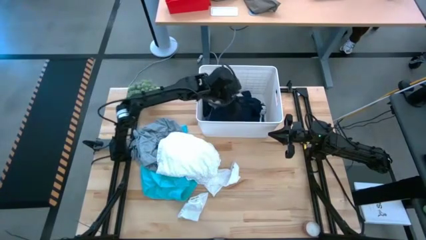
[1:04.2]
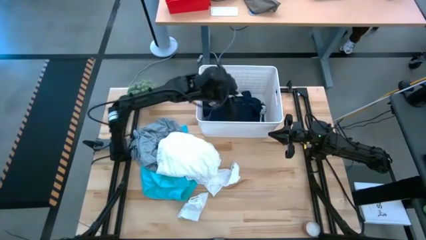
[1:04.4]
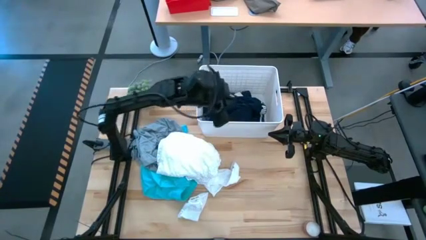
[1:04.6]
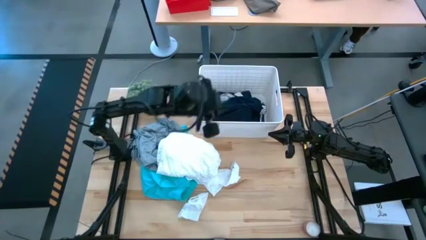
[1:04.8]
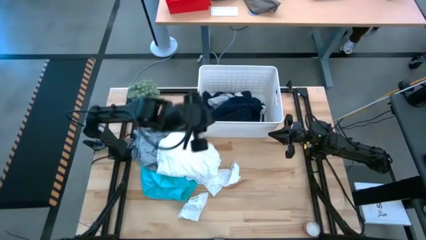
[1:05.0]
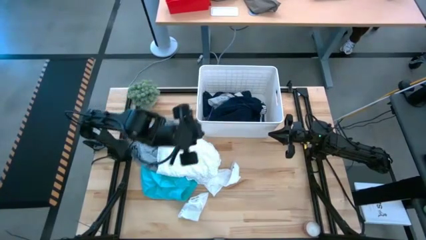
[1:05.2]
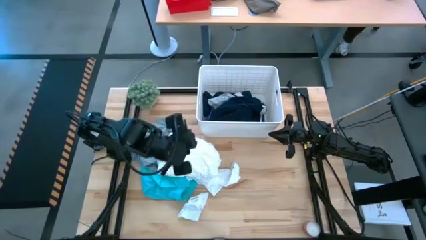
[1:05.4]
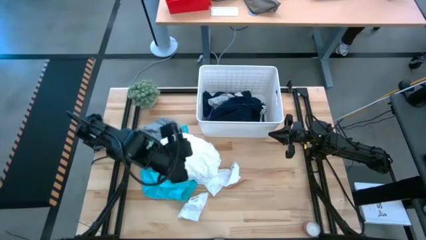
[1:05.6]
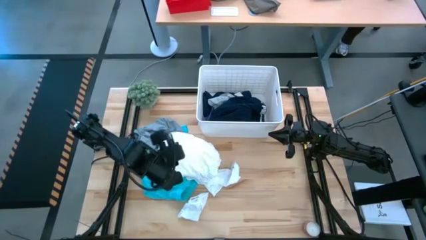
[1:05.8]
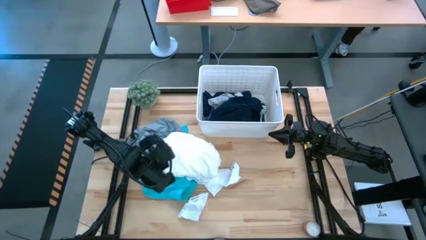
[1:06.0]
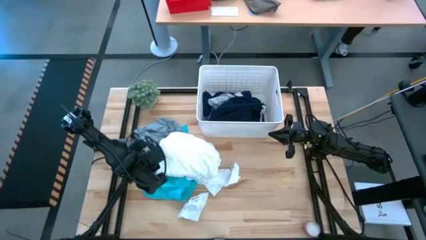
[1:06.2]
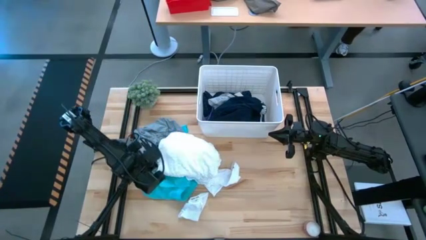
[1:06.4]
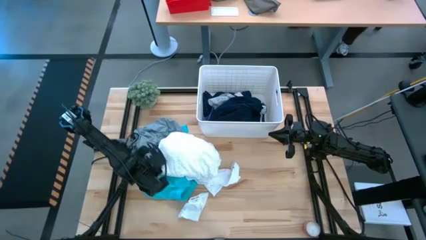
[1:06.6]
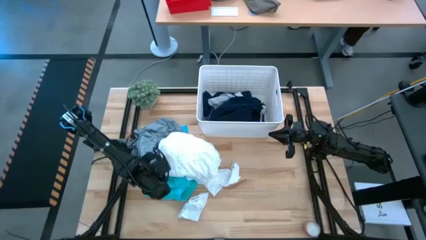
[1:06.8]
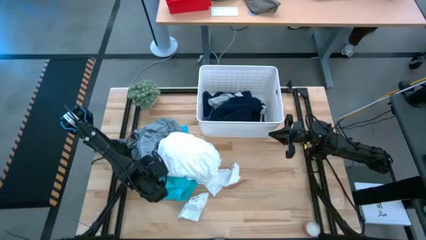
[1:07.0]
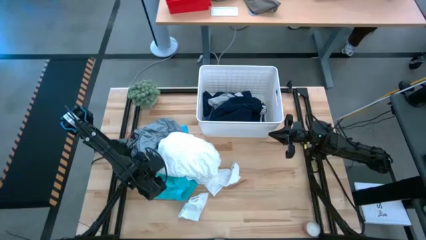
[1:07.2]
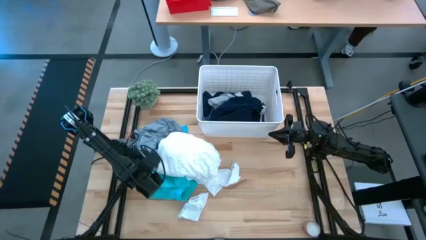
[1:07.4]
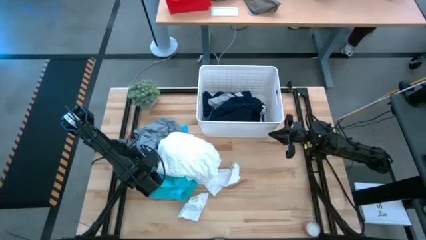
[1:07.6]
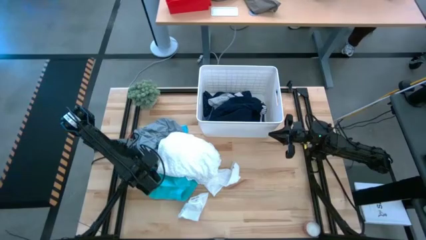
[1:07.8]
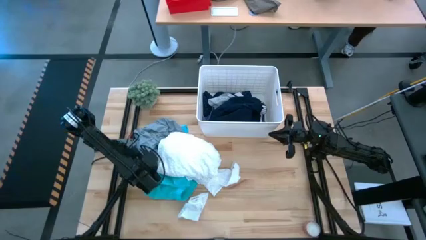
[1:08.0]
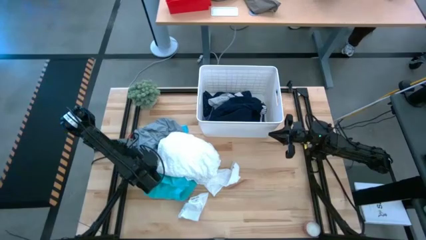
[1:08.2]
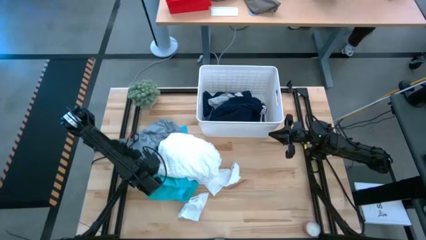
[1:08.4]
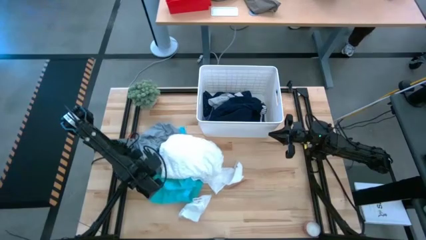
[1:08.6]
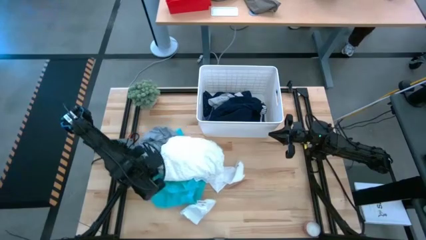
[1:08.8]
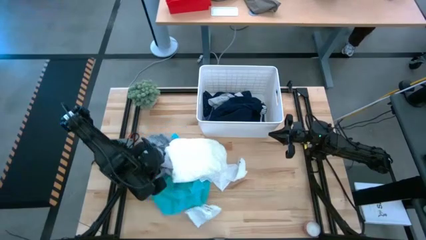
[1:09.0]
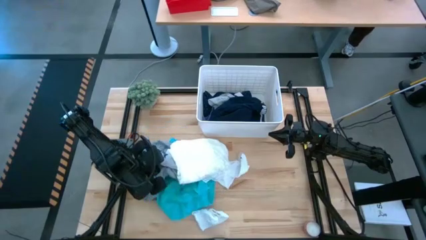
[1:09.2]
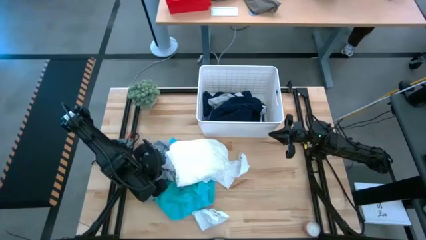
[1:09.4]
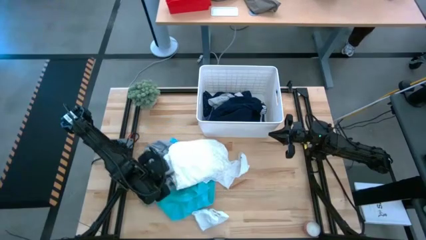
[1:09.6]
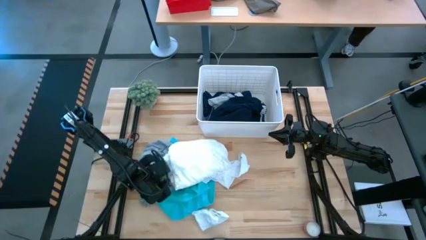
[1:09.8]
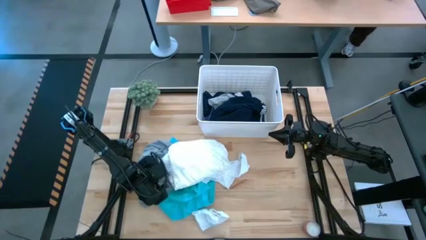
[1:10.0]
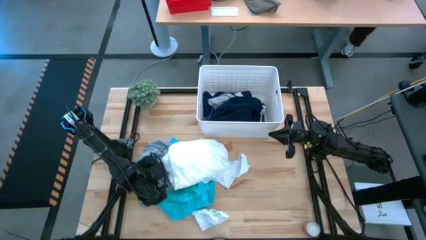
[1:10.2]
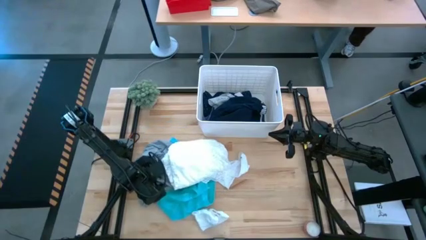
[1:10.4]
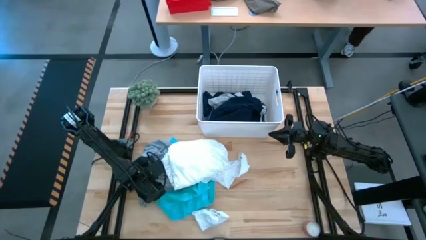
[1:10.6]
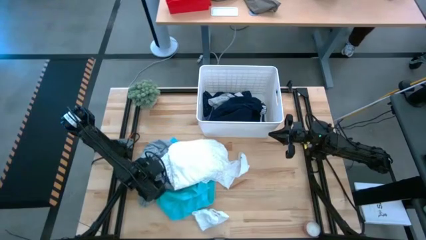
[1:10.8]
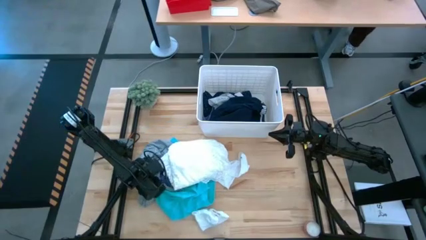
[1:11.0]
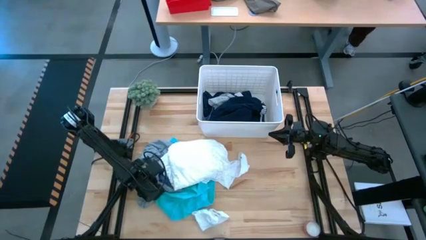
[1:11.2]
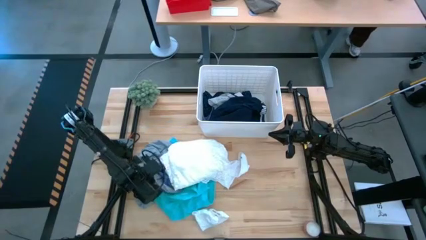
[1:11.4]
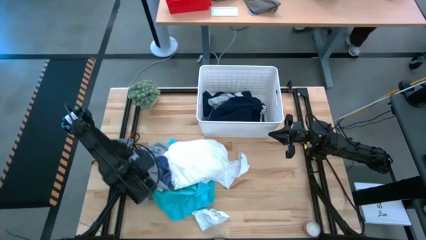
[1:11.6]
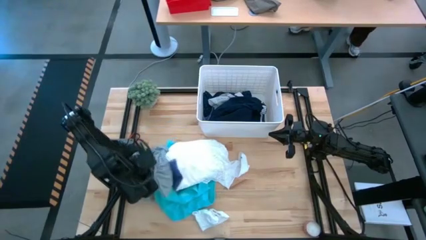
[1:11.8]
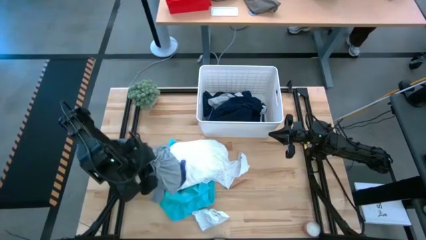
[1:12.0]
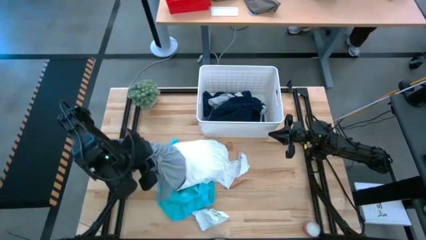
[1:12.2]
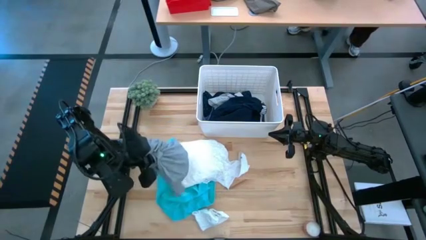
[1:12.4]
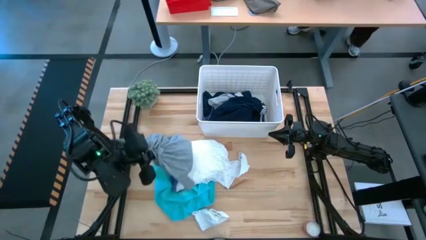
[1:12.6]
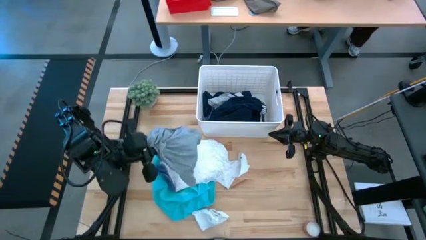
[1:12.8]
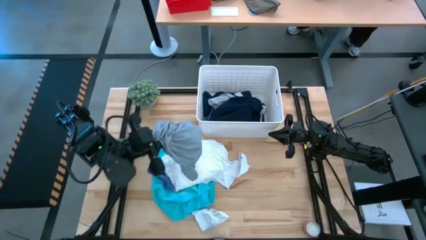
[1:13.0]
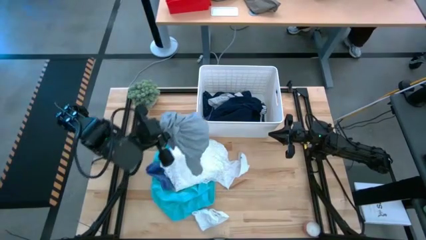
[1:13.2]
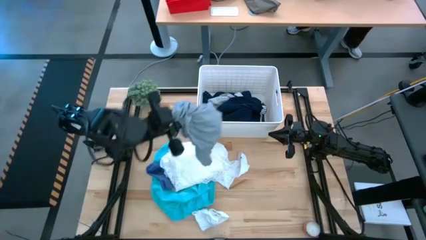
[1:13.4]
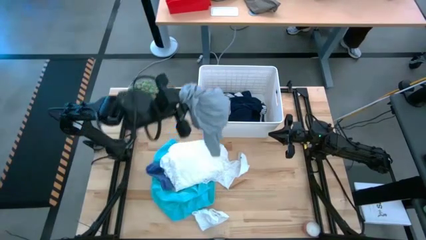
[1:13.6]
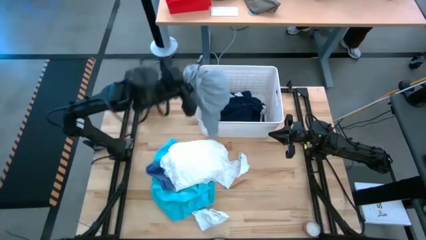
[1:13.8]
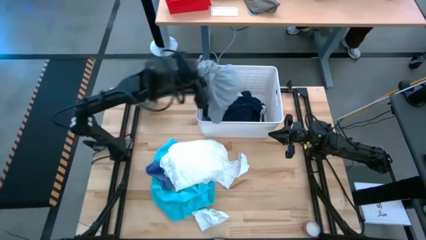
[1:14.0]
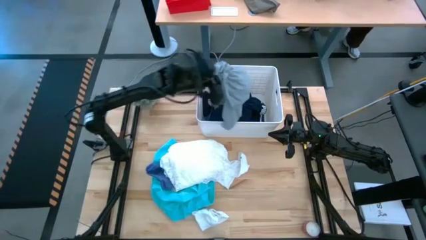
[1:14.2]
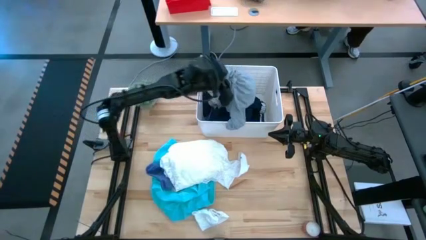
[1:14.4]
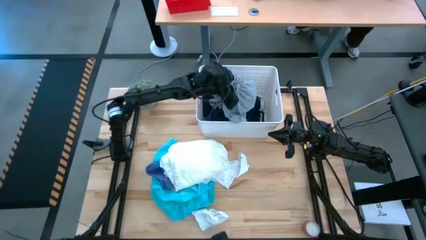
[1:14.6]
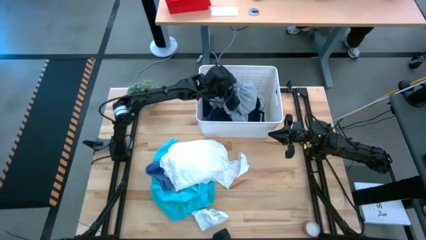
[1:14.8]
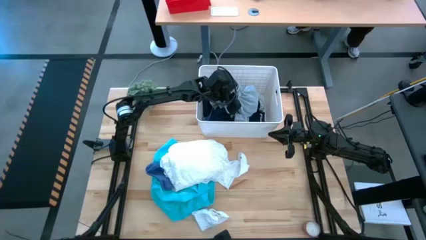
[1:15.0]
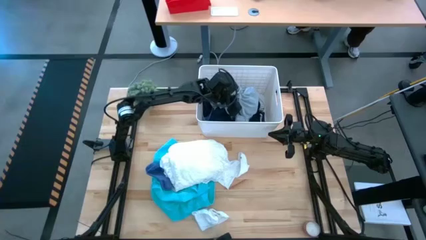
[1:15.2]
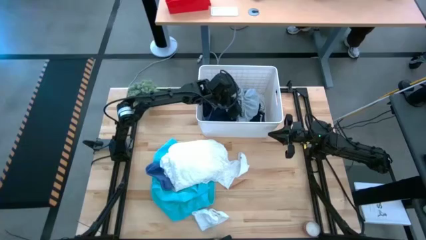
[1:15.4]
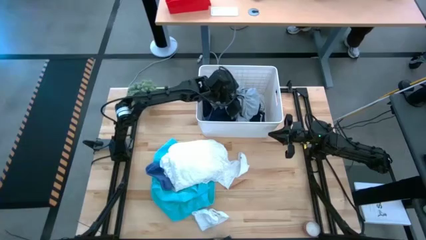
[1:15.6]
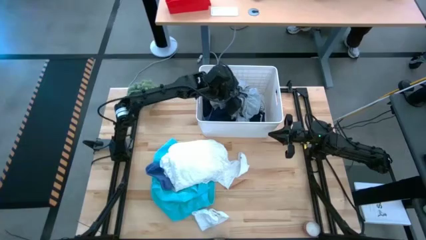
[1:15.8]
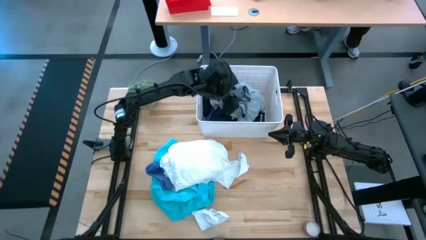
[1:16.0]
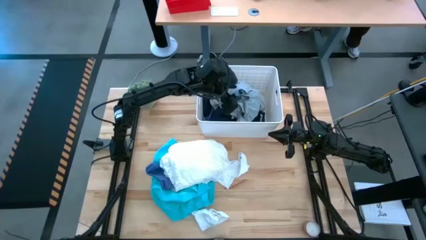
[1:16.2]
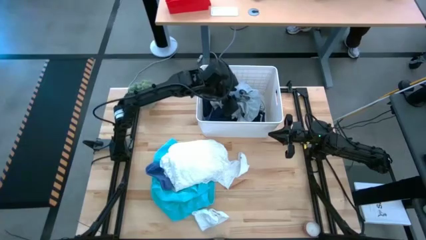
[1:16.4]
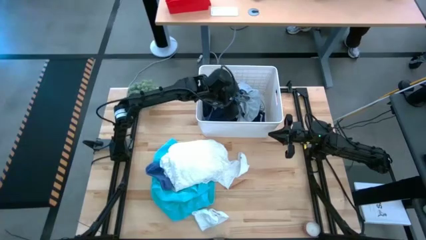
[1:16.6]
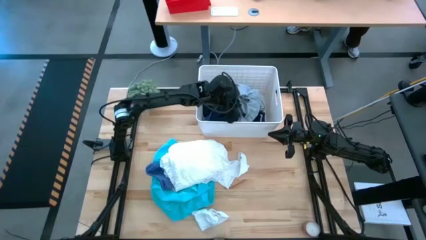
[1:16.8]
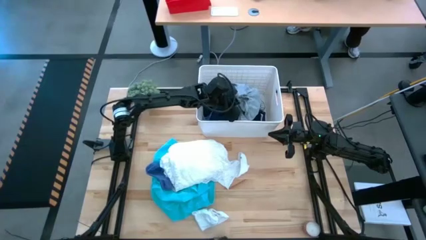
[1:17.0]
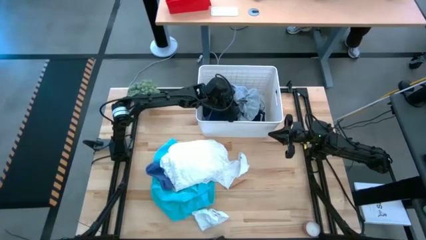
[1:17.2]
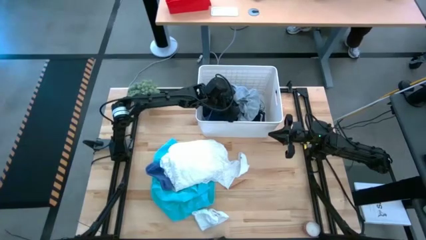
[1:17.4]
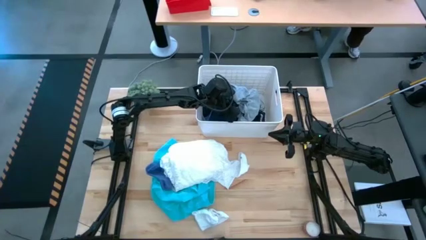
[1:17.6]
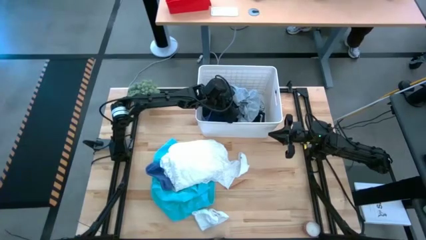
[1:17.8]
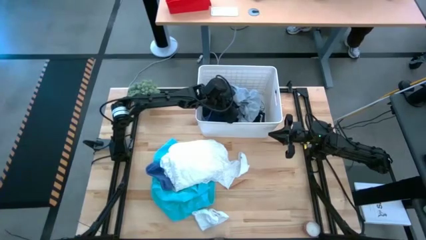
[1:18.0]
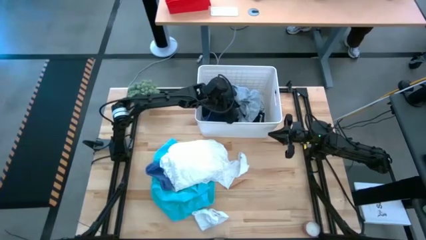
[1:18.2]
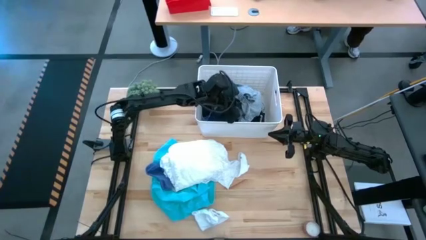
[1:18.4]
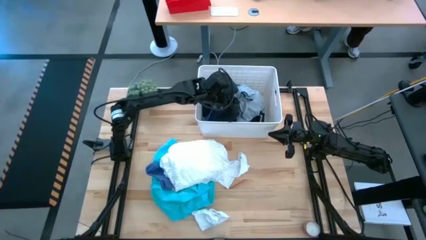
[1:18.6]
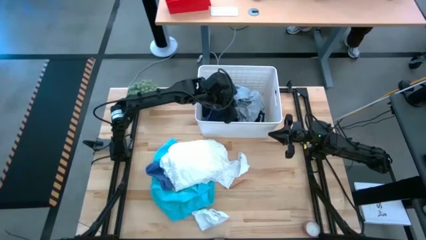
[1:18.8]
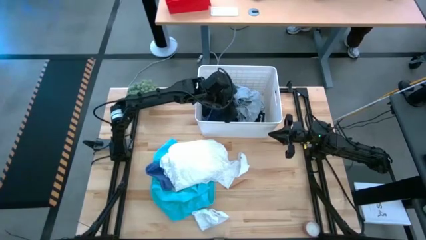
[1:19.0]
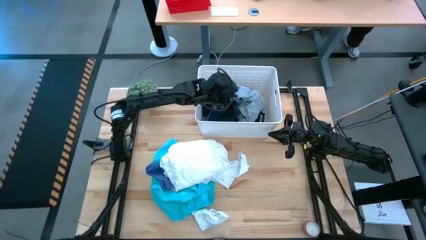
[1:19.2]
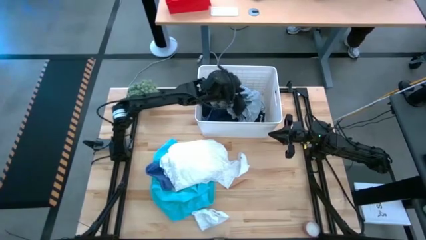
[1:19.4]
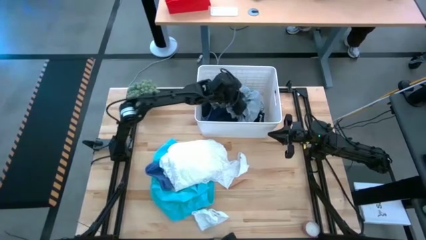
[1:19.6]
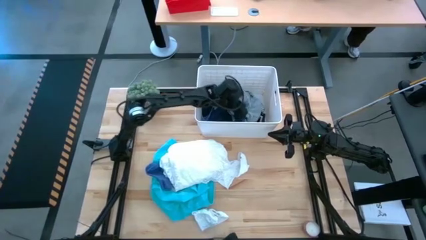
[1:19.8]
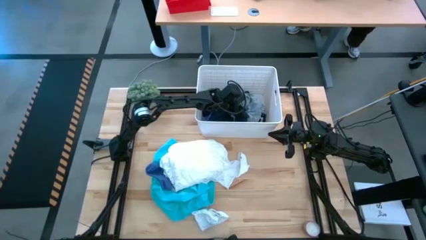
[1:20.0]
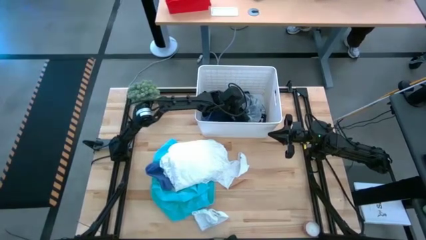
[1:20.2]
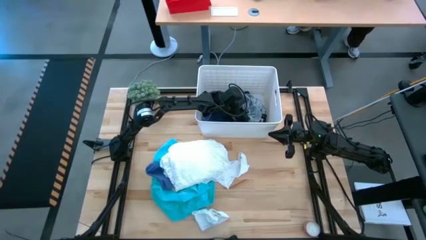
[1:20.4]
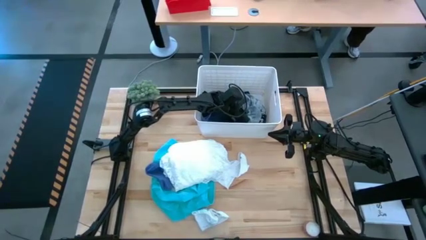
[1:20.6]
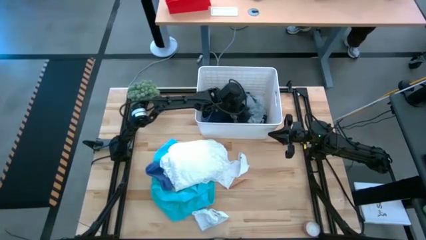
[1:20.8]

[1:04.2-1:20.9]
Task: Sort clothes
Put the gray shorts into the white bin
